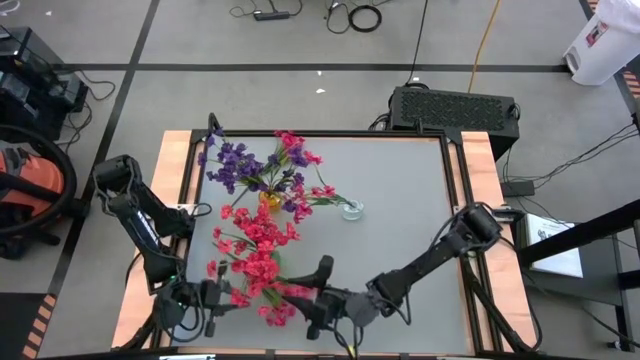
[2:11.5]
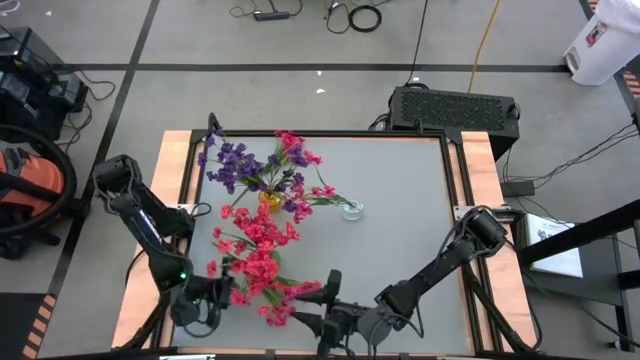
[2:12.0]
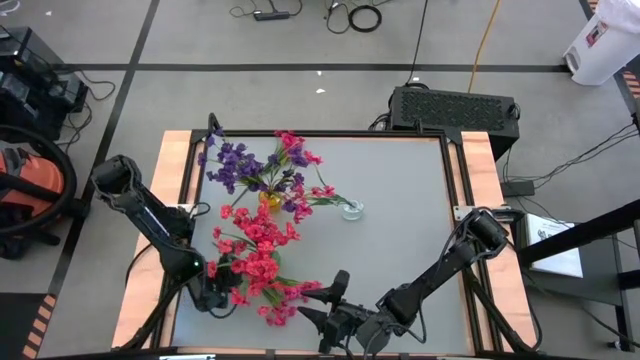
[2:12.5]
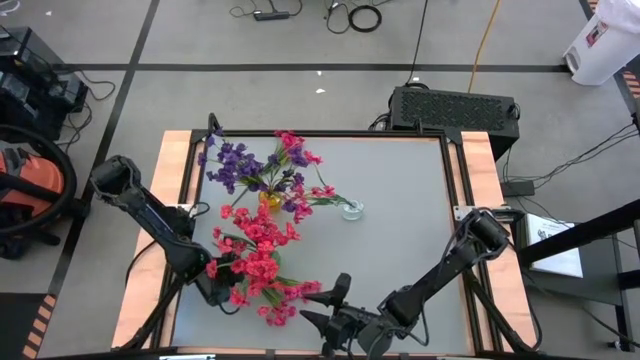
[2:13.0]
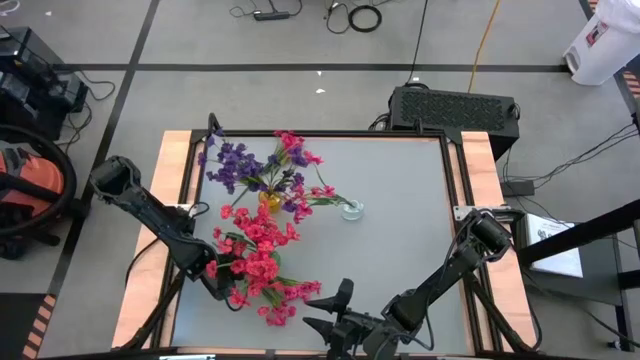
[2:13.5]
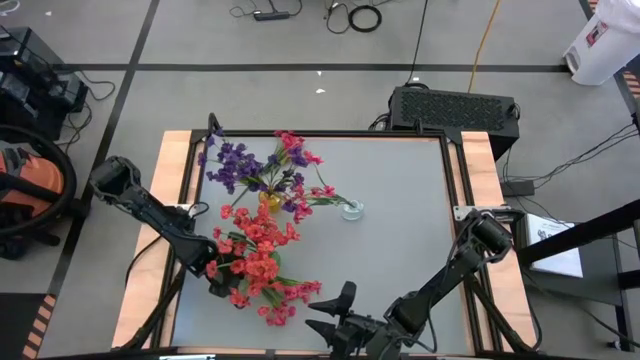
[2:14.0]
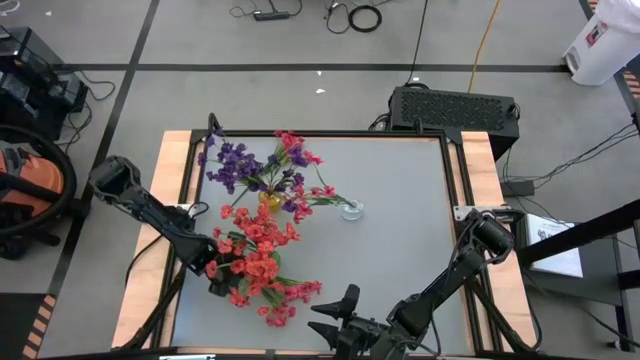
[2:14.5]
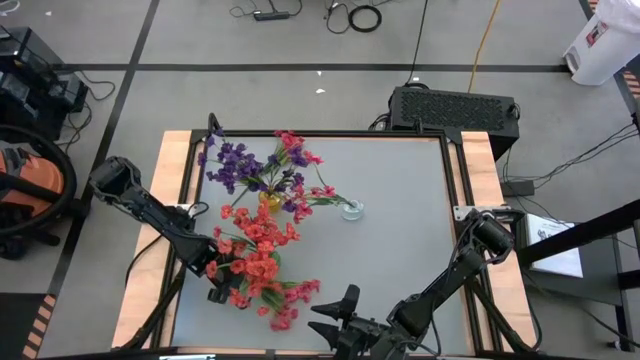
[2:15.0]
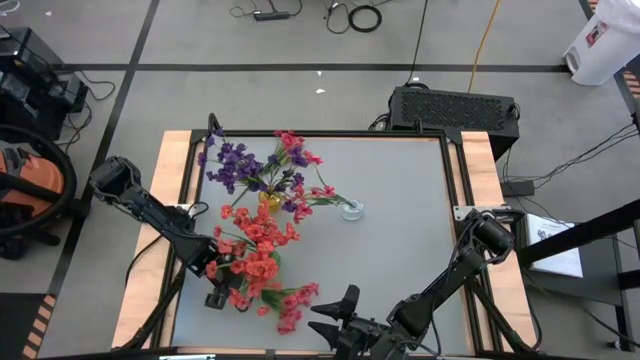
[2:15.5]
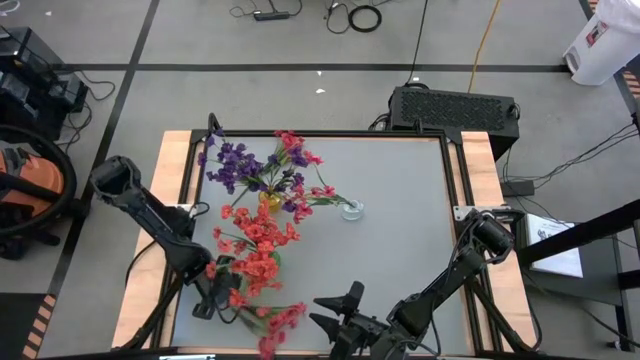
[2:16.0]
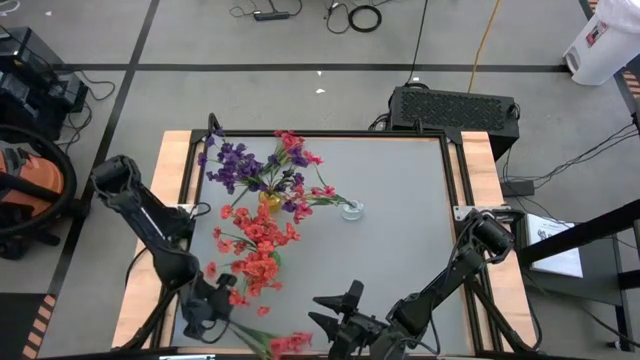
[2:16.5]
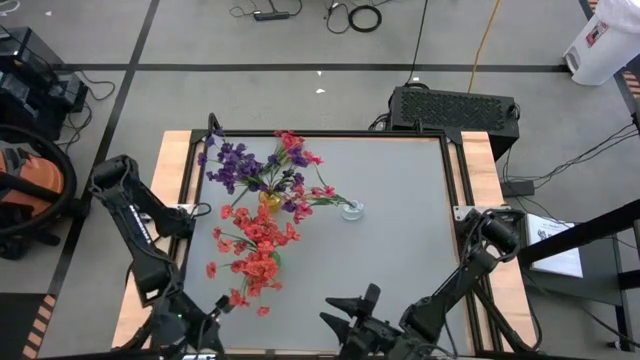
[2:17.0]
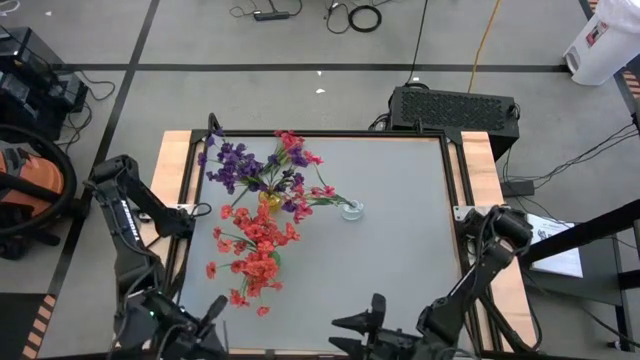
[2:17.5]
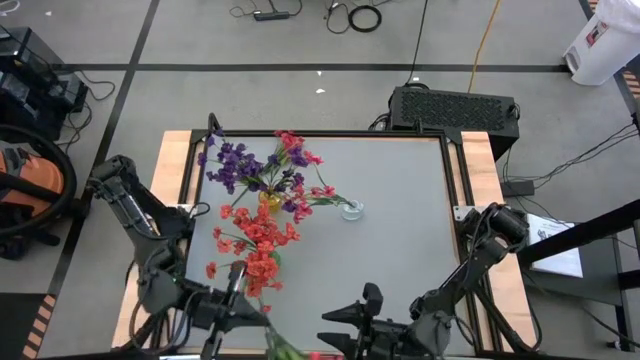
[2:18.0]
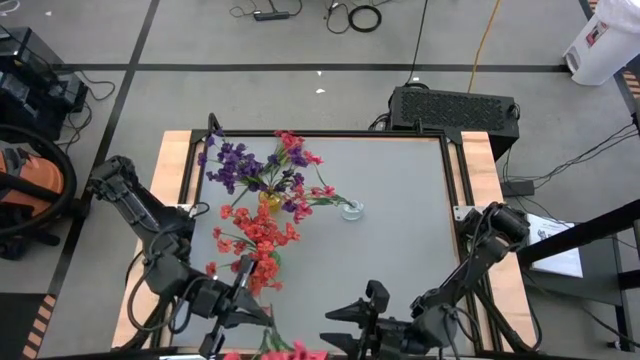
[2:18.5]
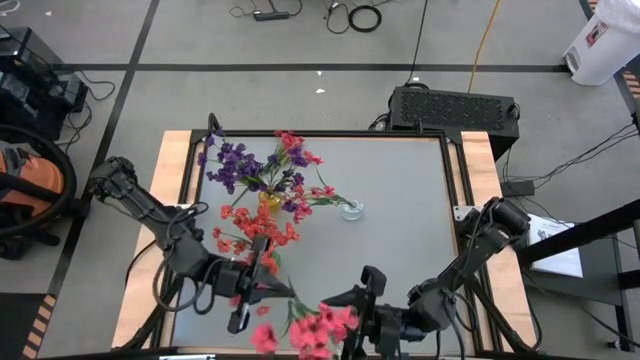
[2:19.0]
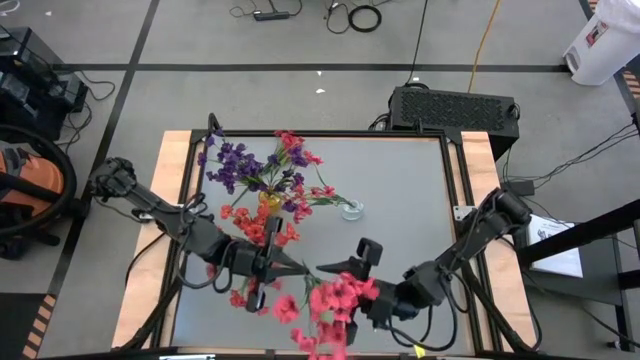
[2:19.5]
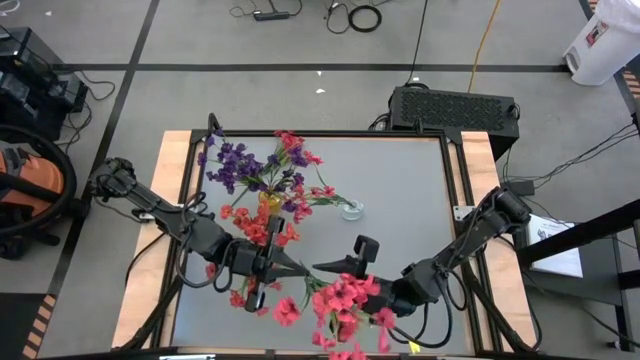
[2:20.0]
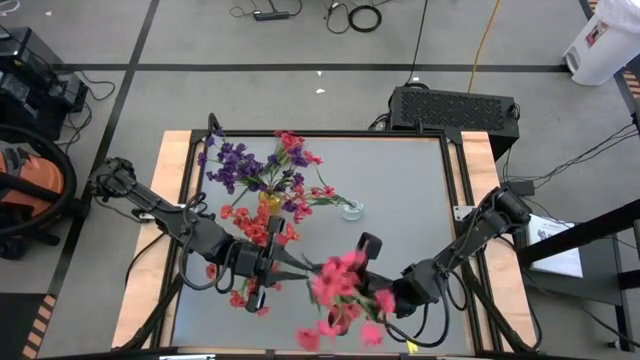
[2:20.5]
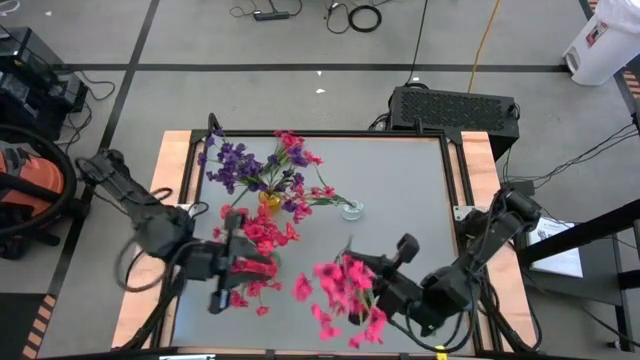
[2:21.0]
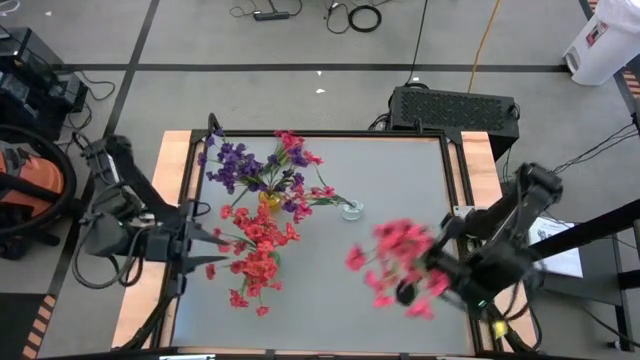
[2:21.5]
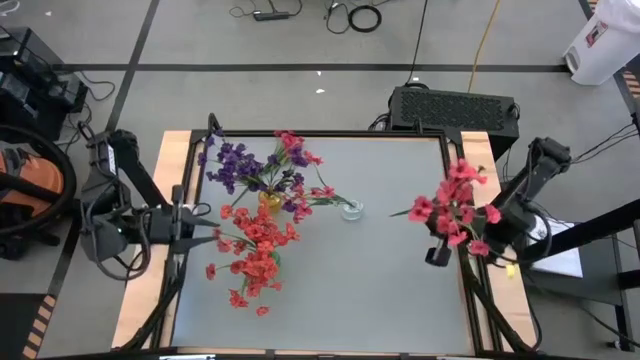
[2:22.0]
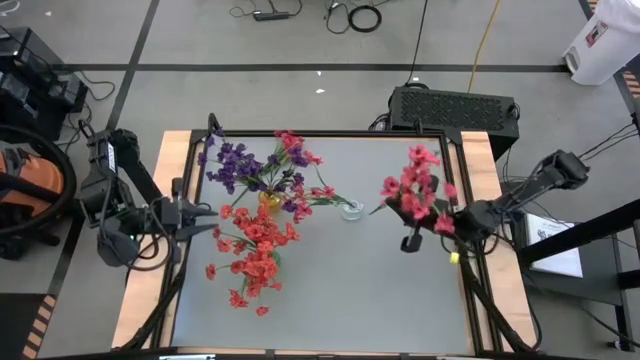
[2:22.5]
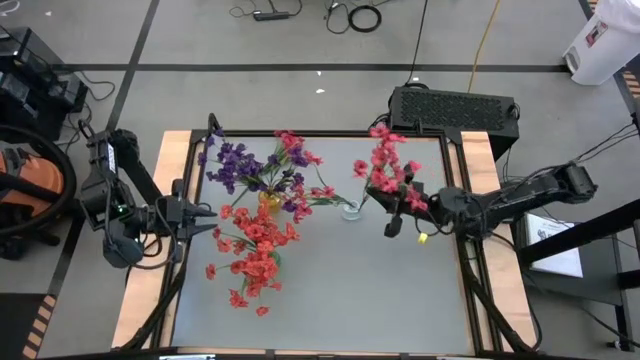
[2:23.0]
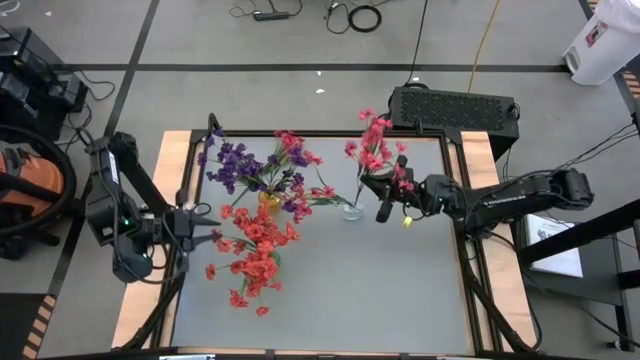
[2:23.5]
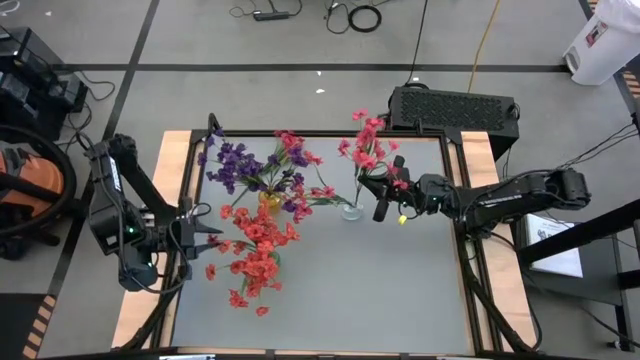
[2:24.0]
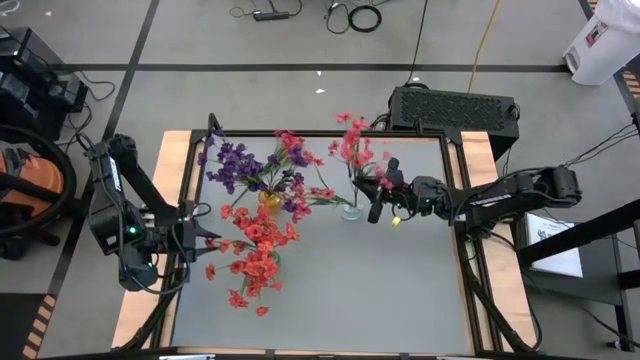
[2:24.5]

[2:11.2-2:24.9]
Task: Sort flowers into vase by color
Put the bottom pink flowers into the transparent vase

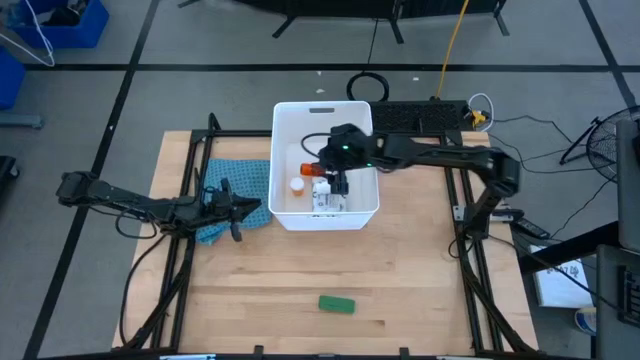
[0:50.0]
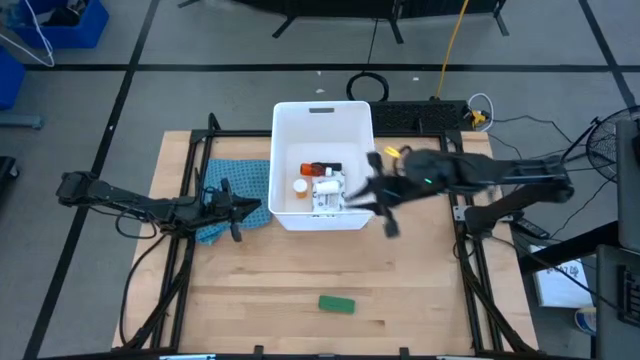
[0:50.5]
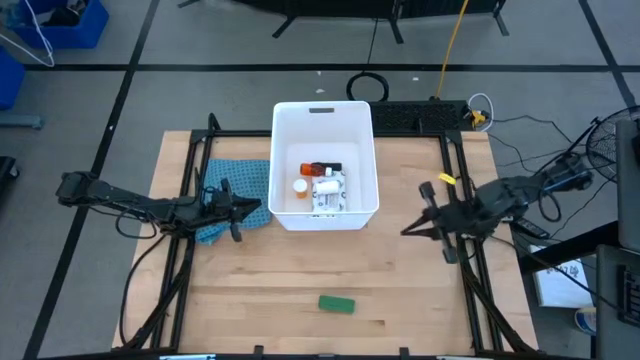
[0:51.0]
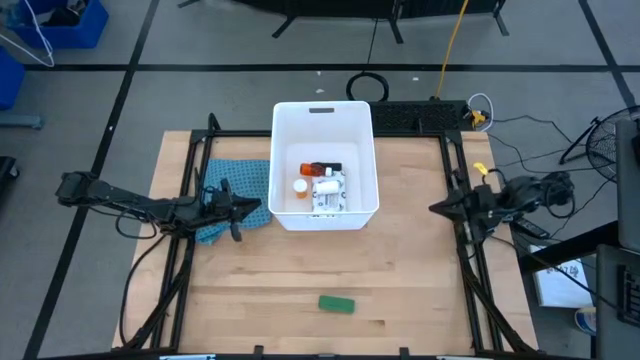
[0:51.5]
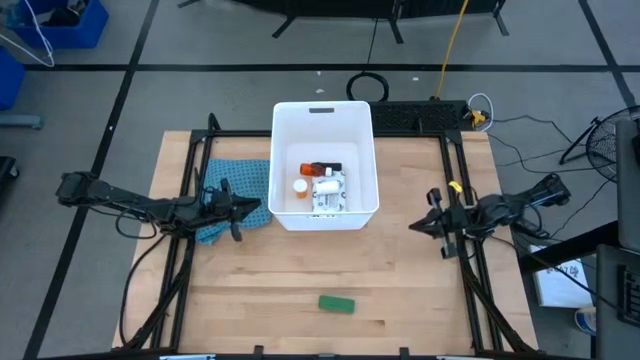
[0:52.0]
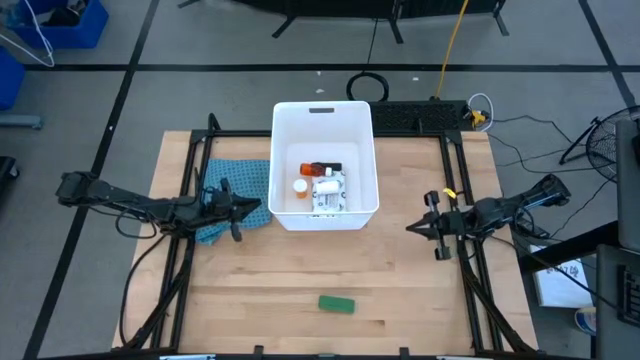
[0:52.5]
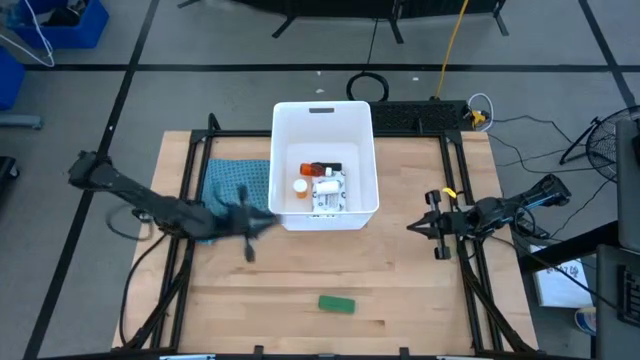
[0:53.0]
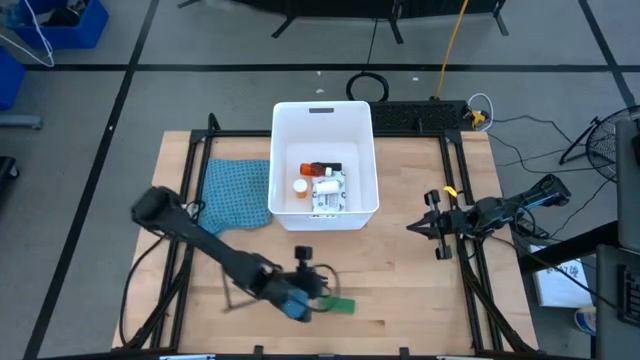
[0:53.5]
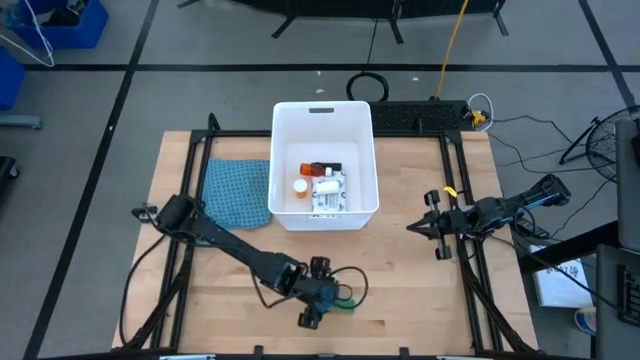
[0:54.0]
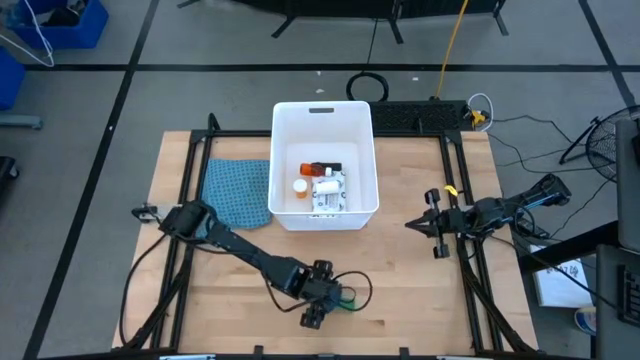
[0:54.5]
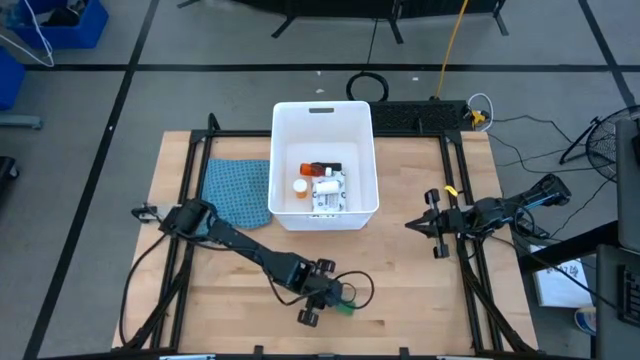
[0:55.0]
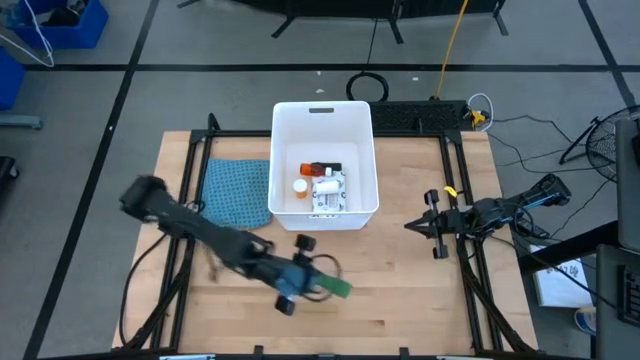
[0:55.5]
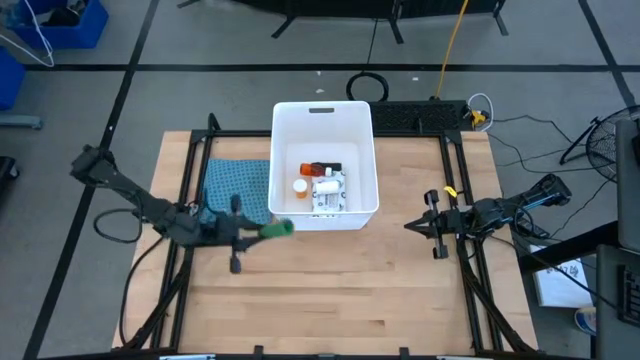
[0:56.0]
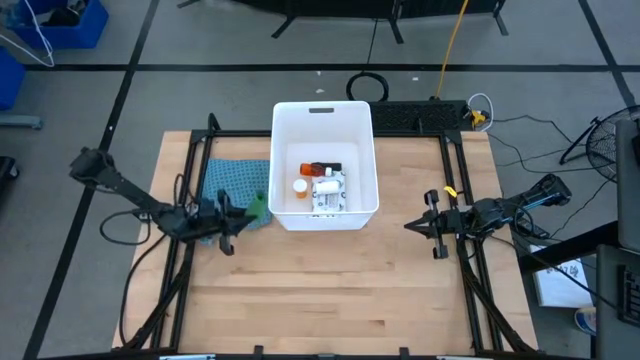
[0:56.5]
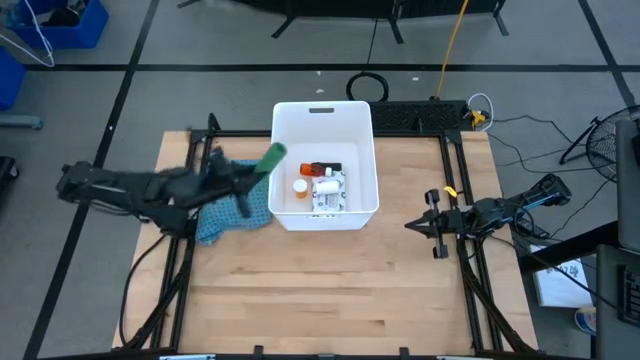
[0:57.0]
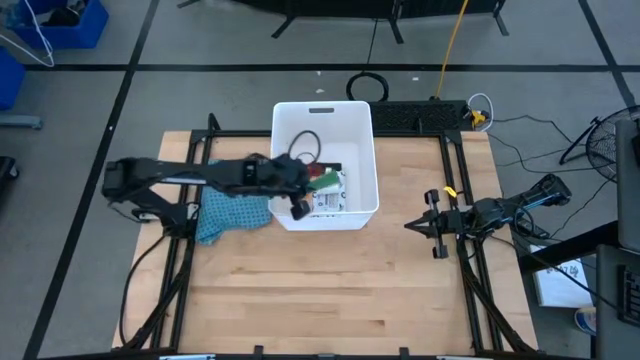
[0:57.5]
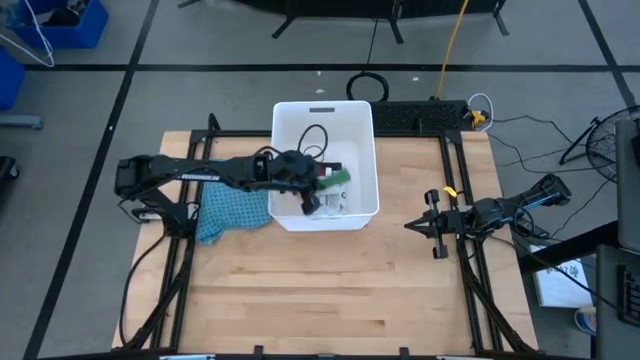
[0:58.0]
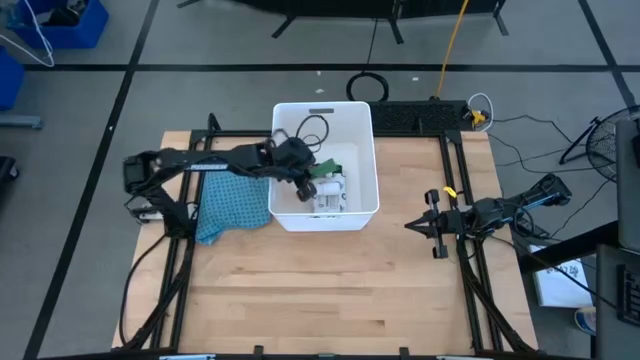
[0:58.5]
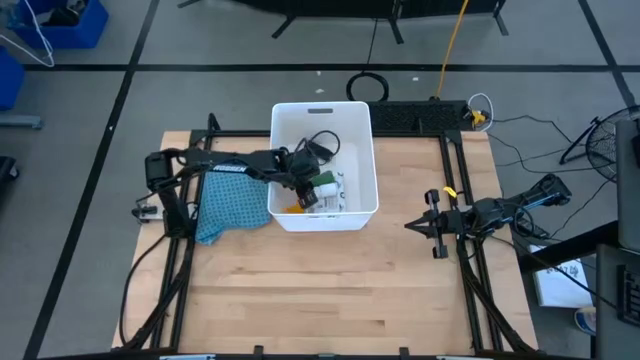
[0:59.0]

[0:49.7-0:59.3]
Task: Pick & place medical supplies in basket/bin
Put the rolled green bandage into the white container
